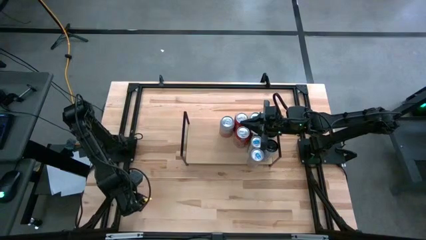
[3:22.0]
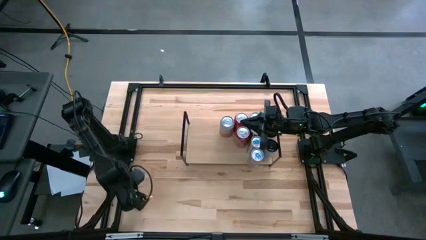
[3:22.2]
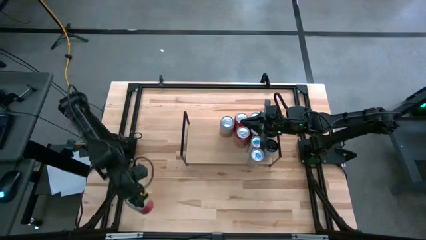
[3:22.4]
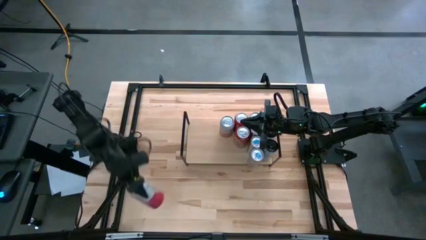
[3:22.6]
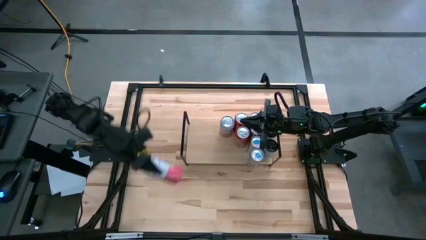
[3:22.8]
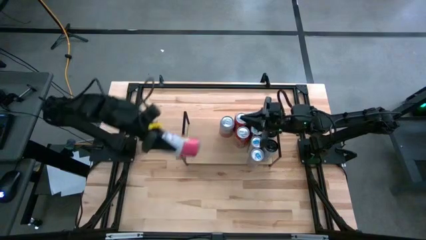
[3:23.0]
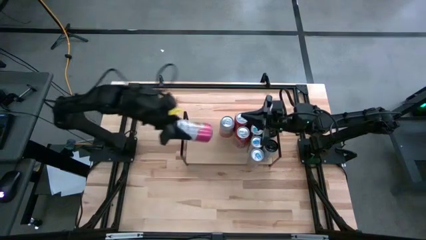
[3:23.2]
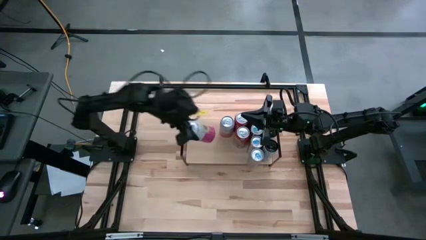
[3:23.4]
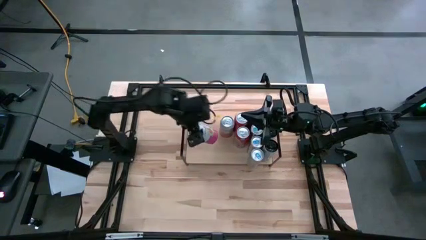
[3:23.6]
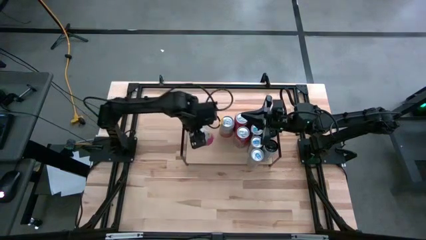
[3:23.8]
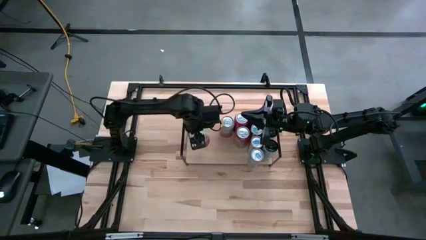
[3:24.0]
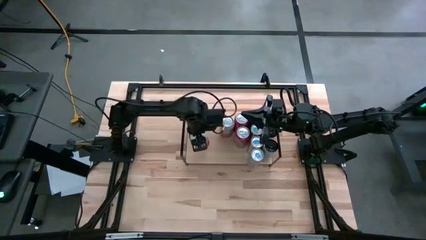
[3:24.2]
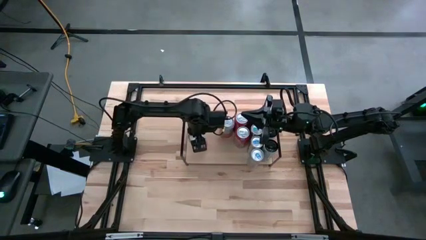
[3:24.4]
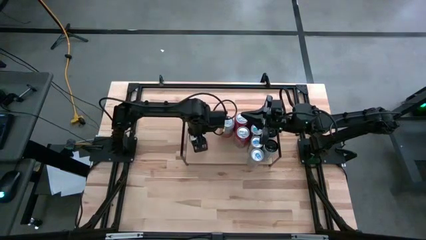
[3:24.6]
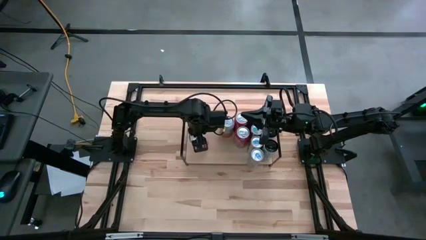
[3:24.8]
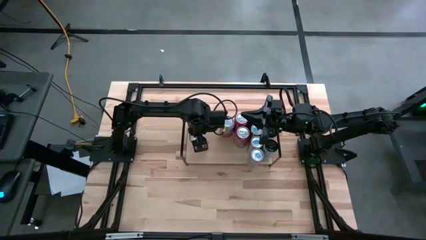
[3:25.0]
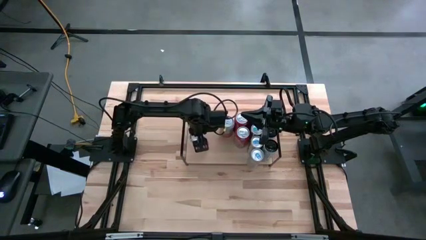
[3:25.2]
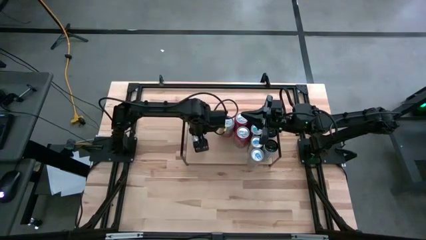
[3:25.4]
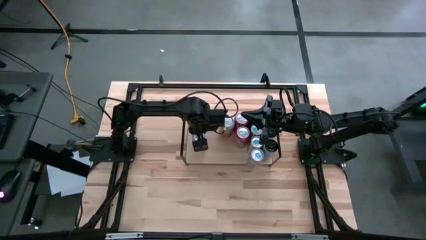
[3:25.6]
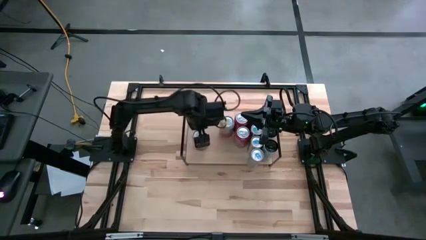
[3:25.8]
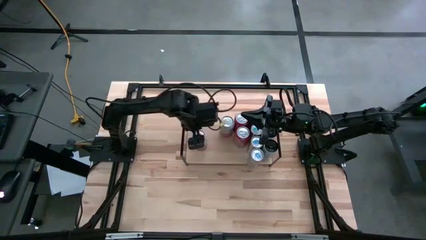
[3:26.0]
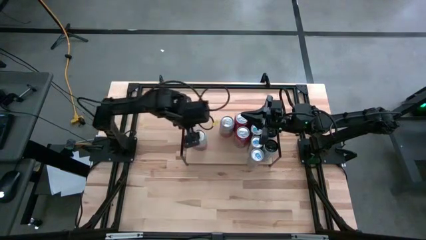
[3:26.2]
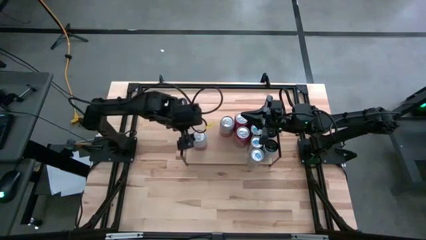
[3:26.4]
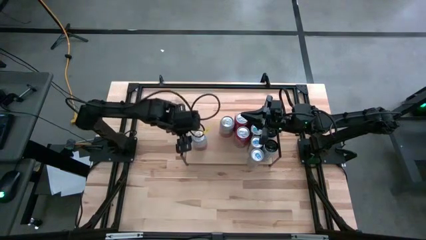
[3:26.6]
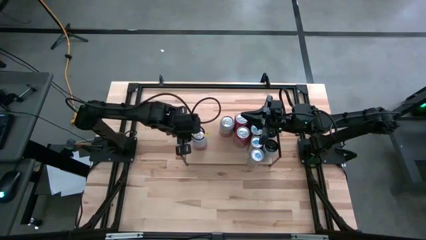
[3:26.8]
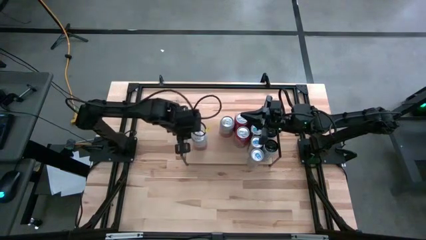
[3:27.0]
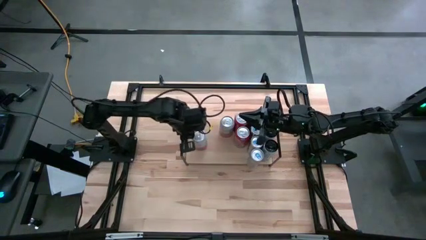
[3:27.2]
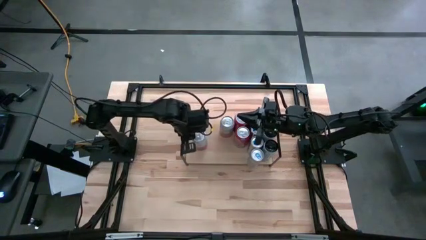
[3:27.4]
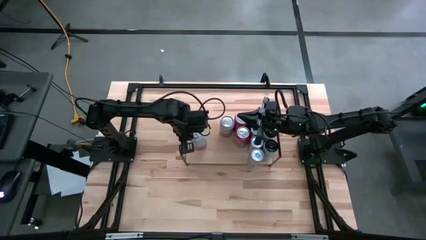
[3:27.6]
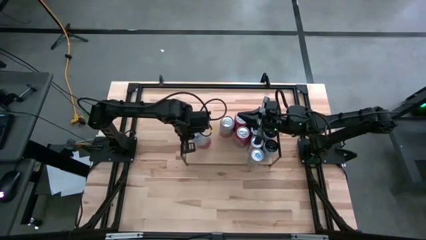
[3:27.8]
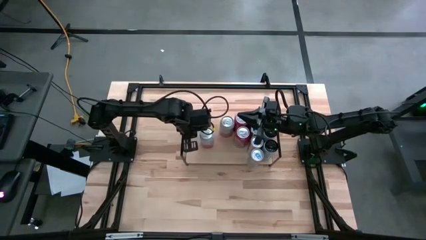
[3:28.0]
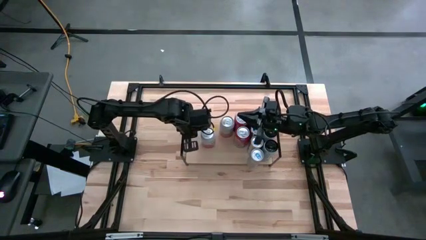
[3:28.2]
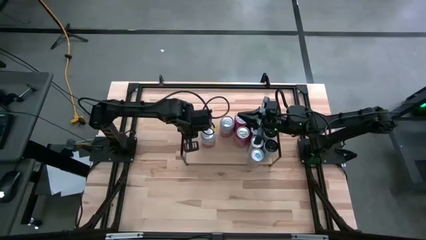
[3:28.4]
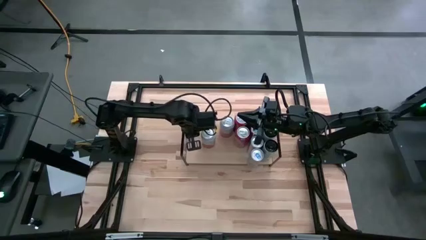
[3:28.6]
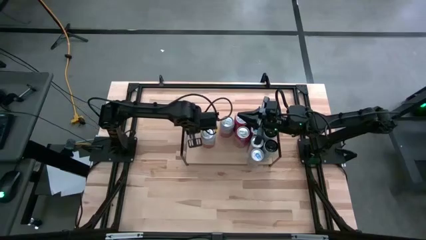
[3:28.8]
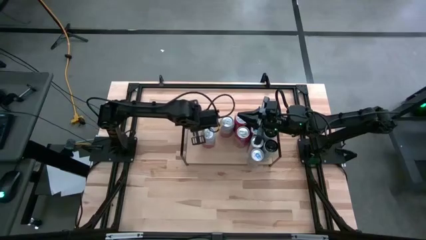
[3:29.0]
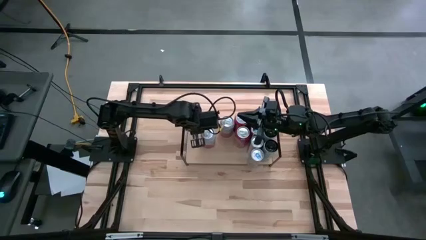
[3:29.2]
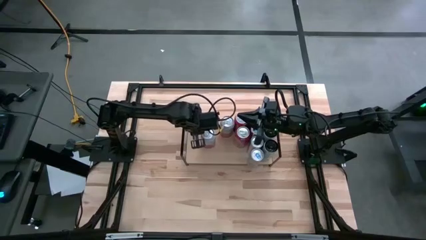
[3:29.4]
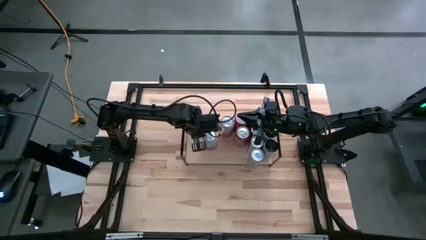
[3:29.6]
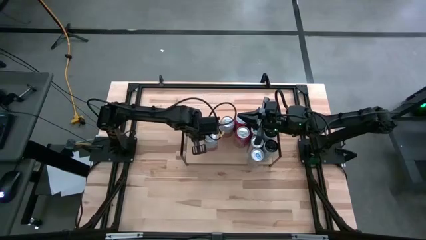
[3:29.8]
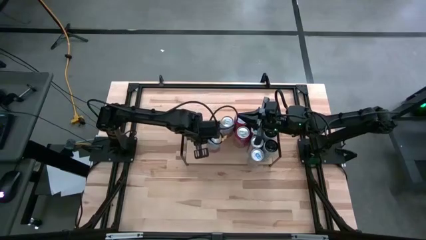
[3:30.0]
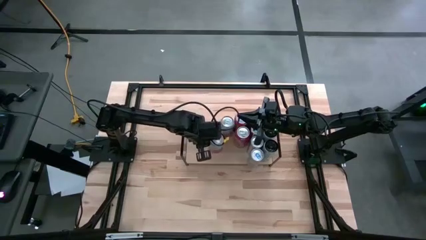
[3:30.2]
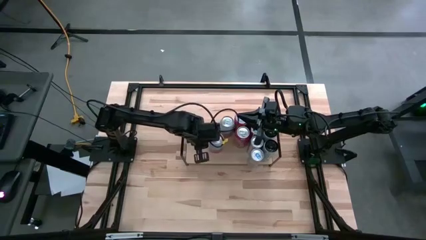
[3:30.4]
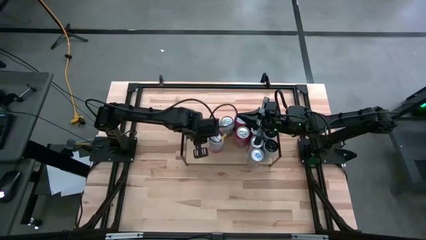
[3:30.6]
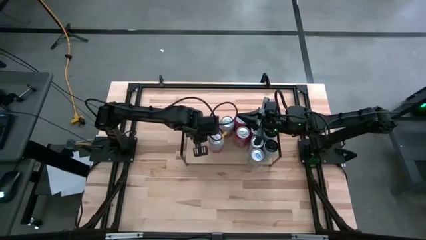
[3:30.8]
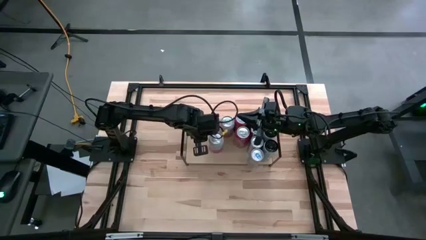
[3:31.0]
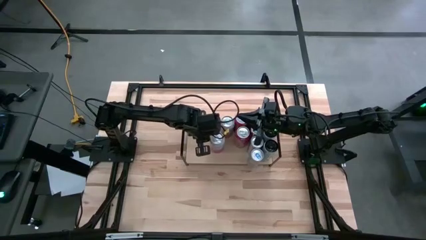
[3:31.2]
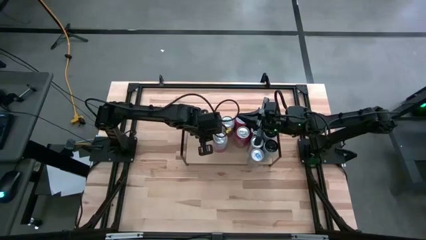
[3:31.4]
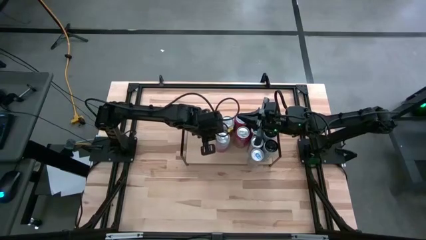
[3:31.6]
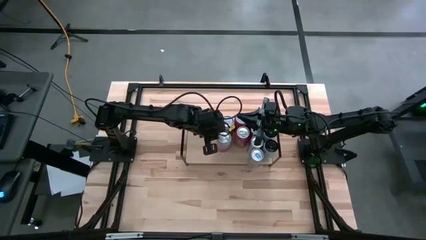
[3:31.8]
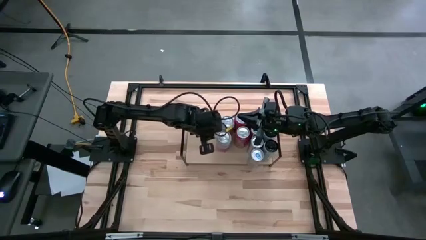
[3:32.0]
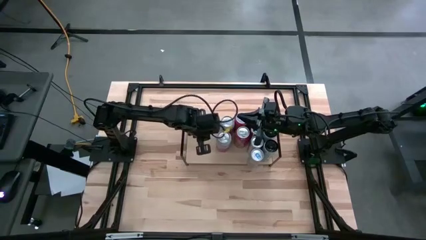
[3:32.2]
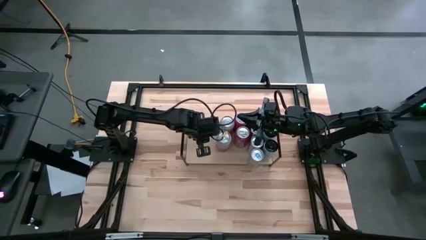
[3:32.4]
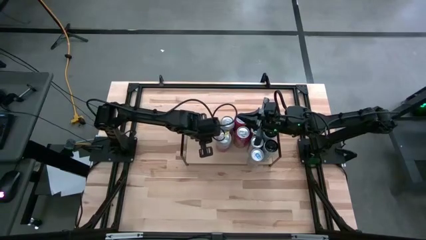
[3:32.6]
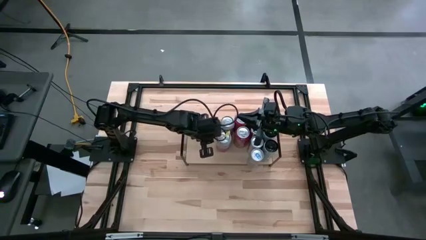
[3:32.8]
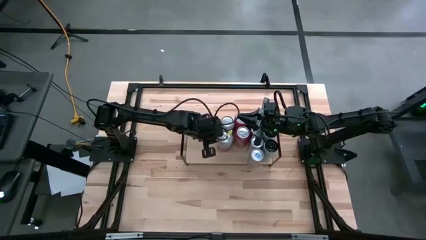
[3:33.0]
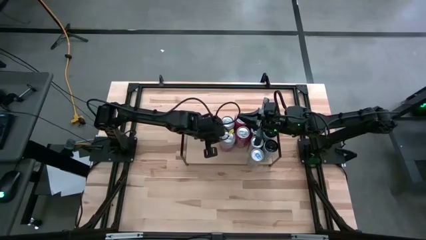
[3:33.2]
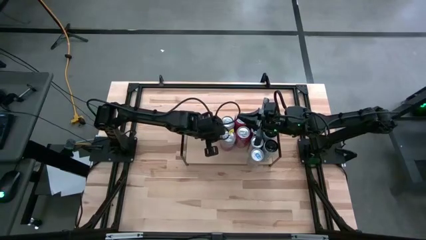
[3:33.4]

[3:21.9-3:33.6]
Task: Place canned beverage on shelf
Put the white pink soda can on the shelf aligned with the other white pink soda can

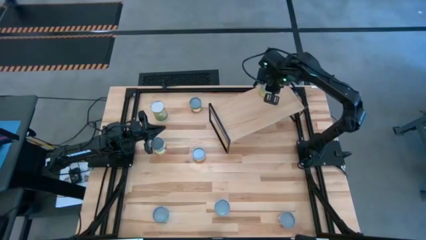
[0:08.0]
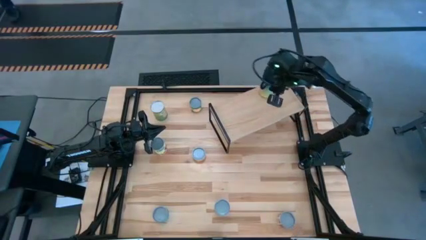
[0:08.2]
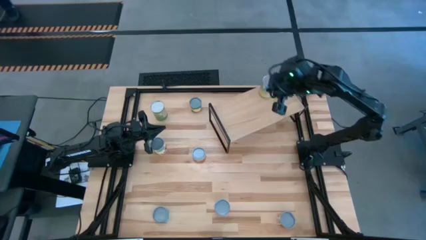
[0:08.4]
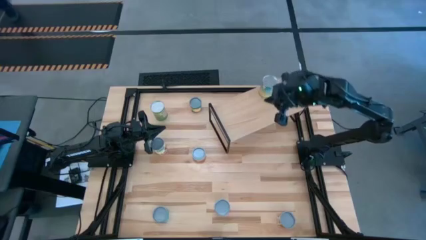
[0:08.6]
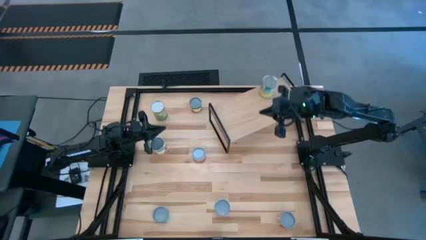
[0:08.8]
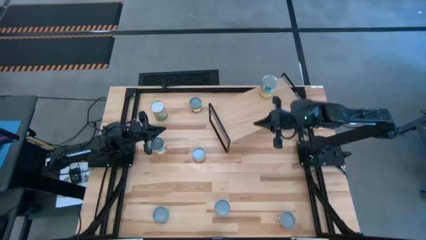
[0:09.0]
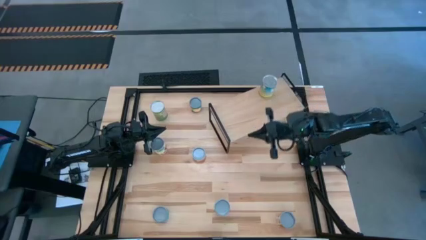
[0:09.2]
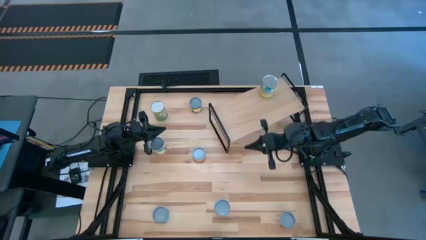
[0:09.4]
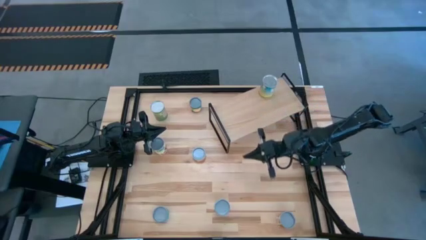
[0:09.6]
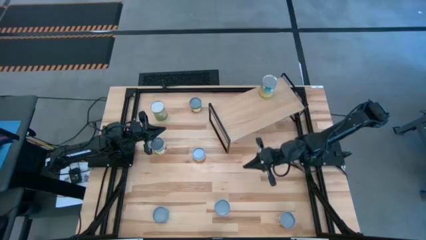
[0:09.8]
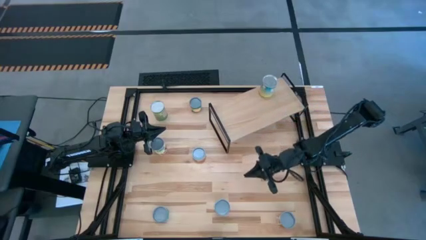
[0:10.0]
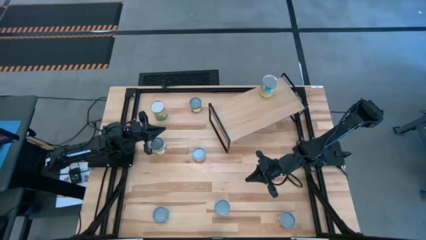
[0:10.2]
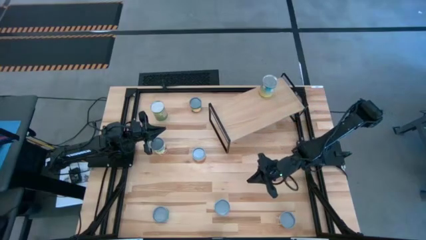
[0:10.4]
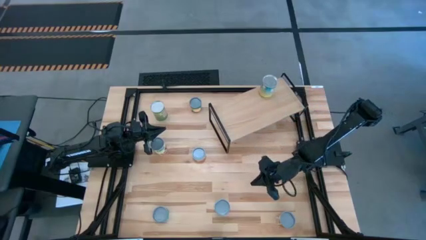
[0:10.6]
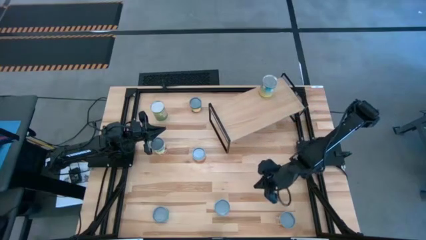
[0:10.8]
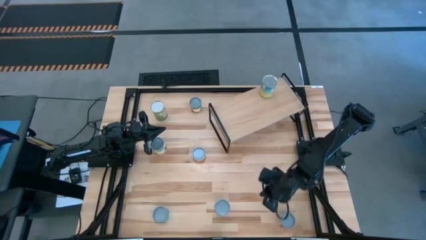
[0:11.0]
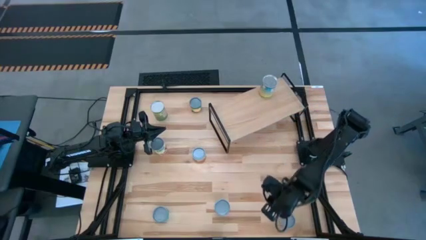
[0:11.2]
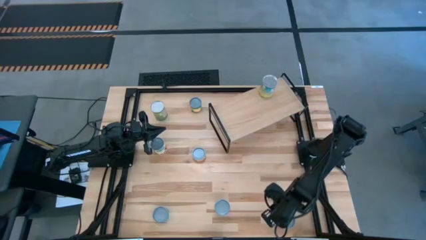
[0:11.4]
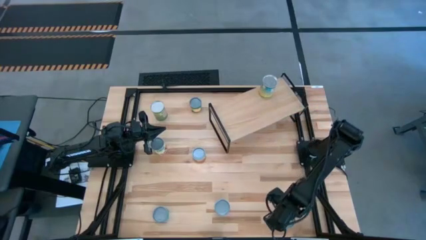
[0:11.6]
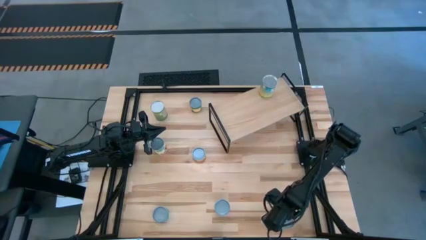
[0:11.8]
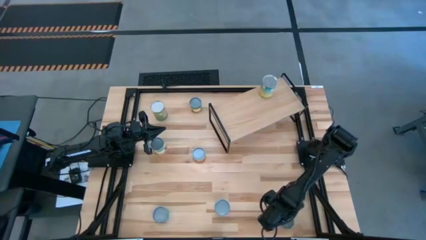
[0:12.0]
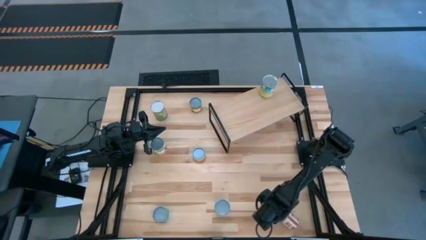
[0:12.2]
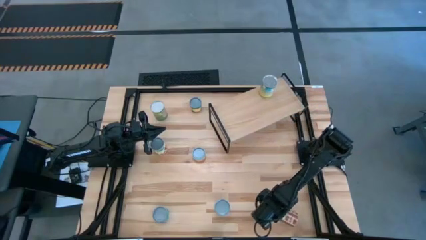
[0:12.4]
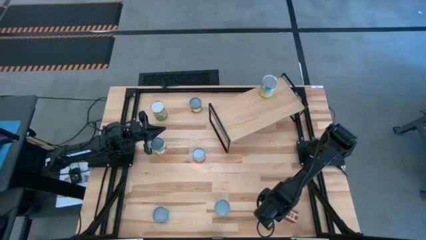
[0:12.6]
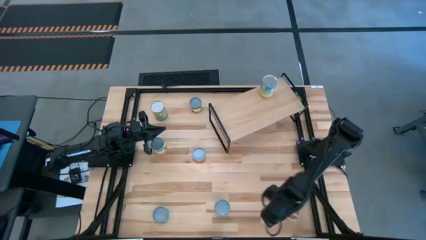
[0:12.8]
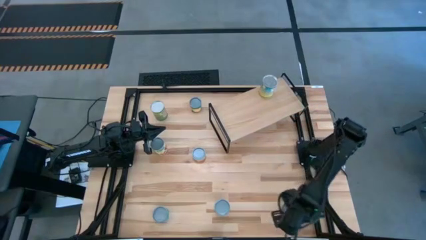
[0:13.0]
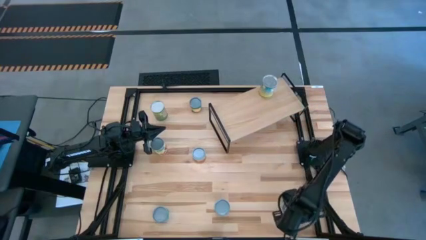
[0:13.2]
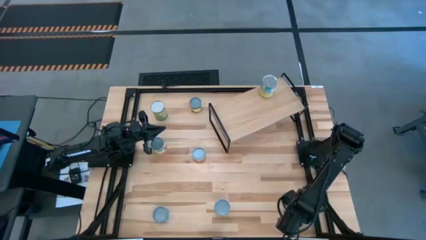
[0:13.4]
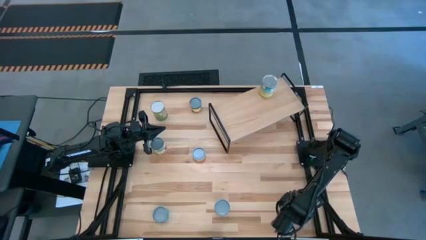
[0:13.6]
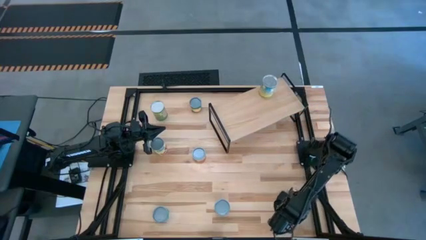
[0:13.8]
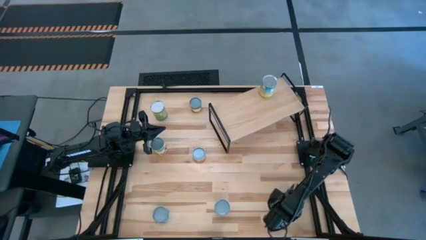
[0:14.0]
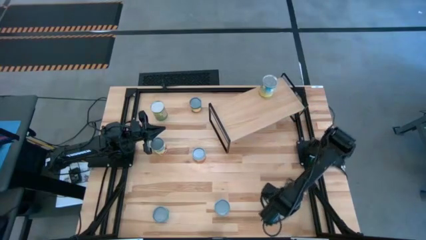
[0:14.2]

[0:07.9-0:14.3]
Task: Pick and place cans onto a shelf
Put the canned tomatoes on the shelf
